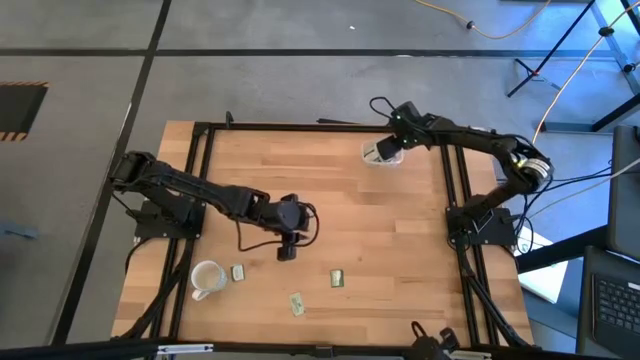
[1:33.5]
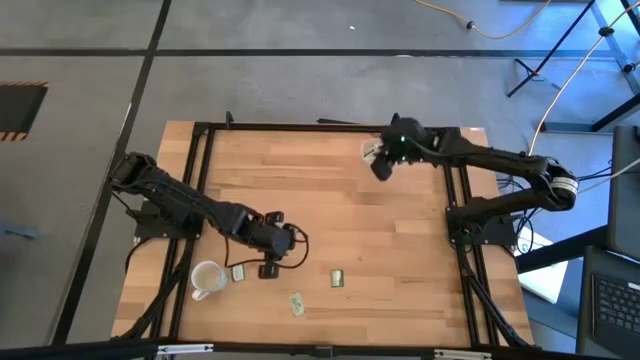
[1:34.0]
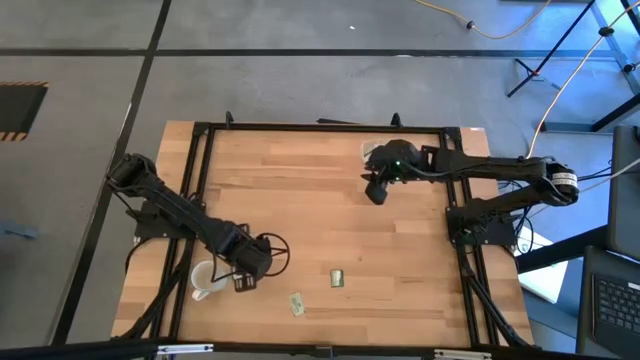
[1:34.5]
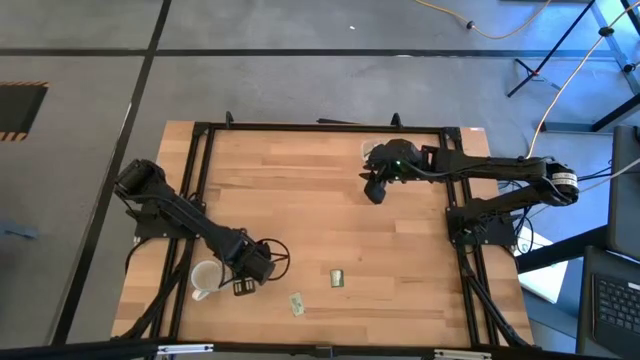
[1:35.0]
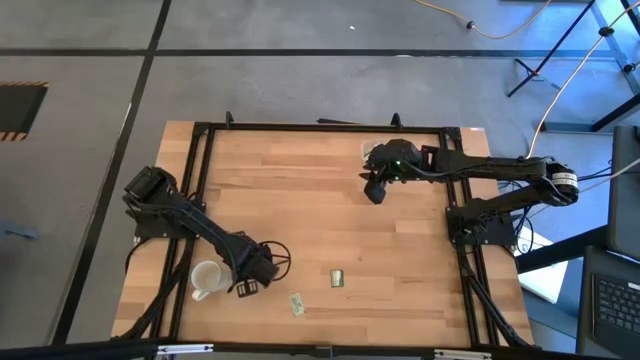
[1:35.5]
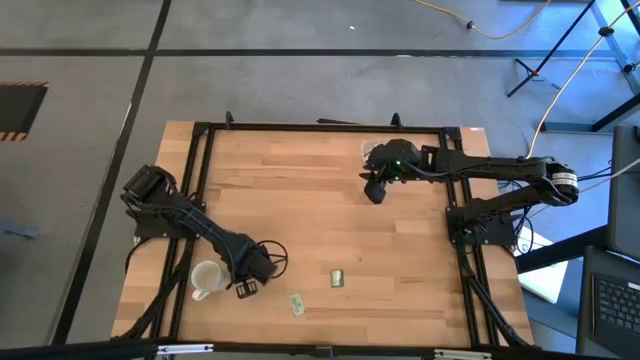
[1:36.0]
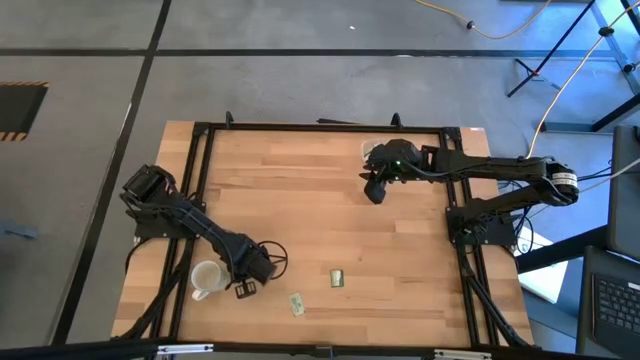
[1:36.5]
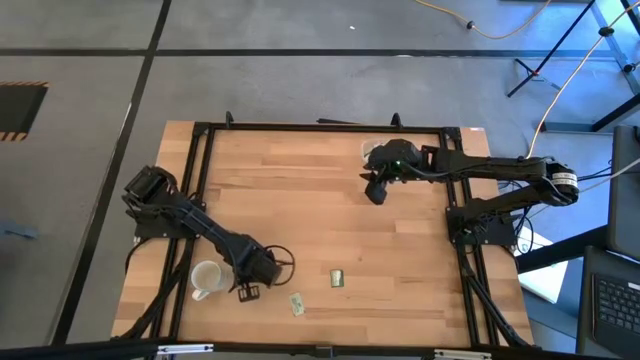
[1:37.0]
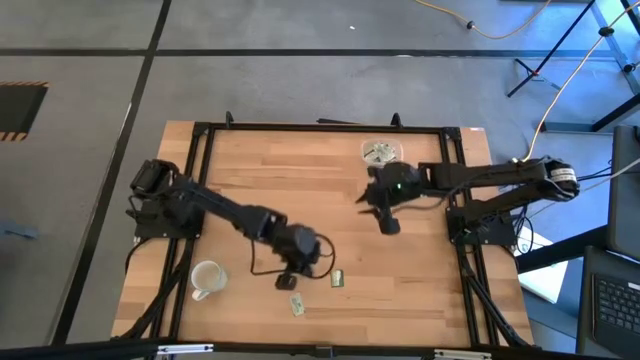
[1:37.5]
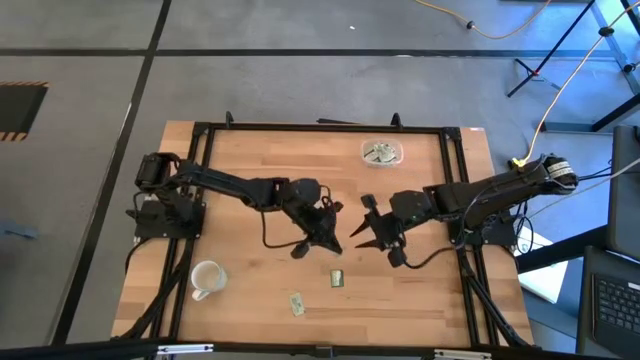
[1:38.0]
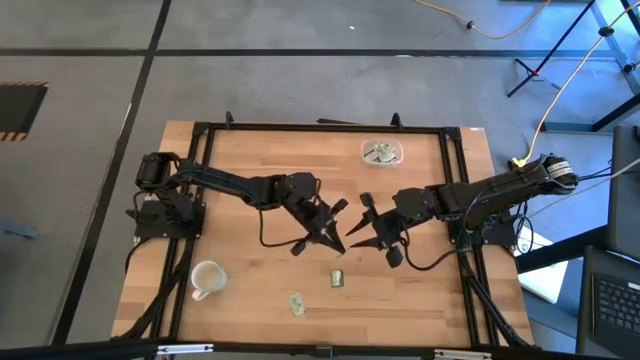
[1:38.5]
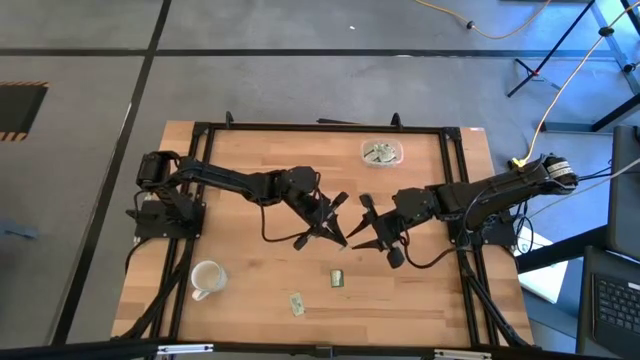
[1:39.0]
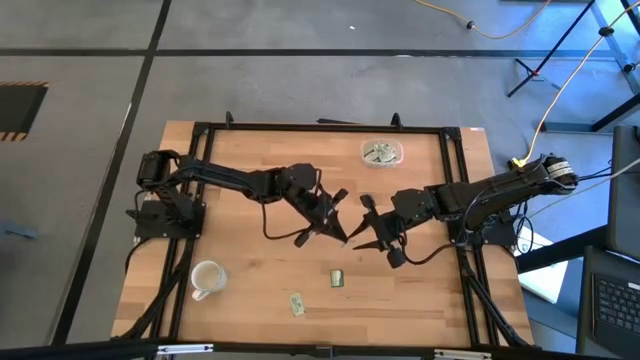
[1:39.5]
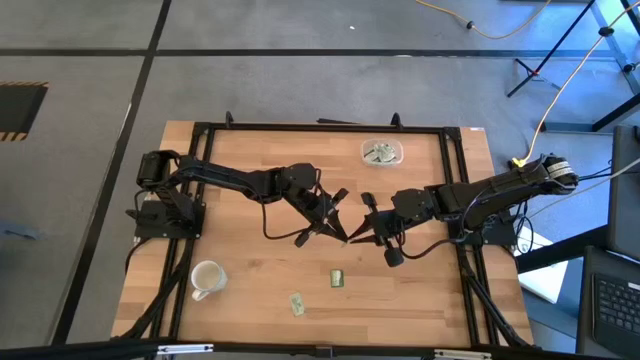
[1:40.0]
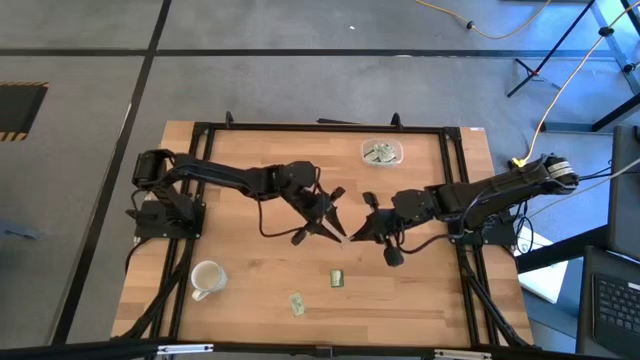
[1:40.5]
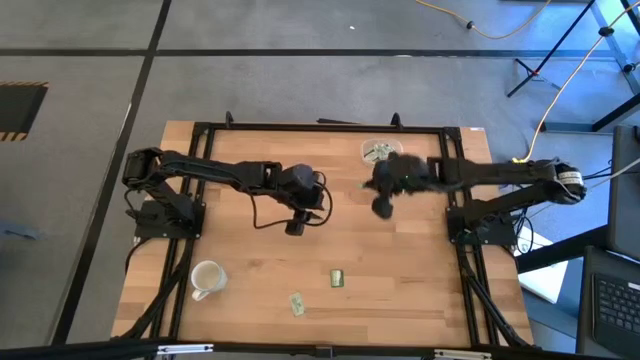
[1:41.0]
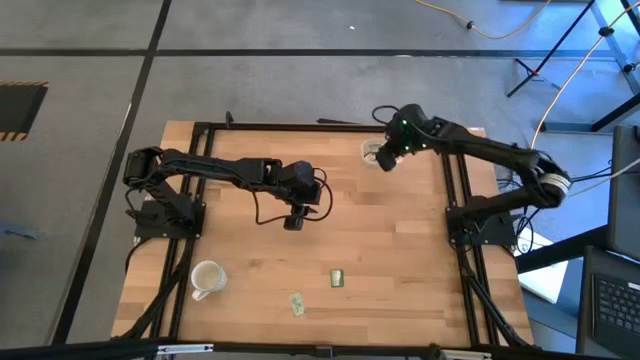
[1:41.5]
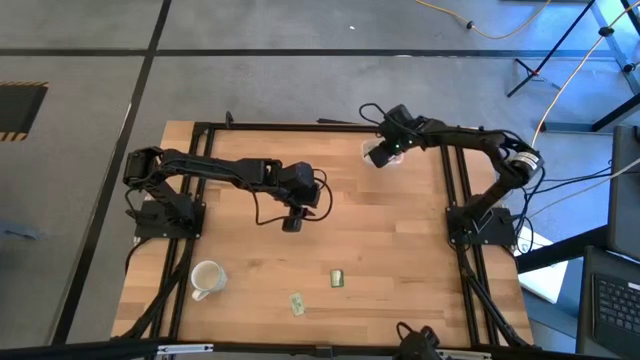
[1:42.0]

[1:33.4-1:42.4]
Task: Pick and place Stevia / Truvia into bins
Put the dark green truvia packet into the transparent container

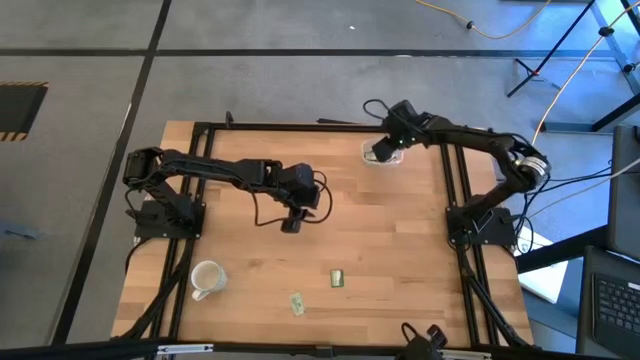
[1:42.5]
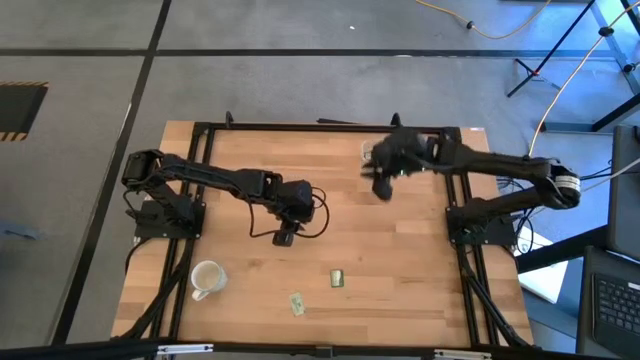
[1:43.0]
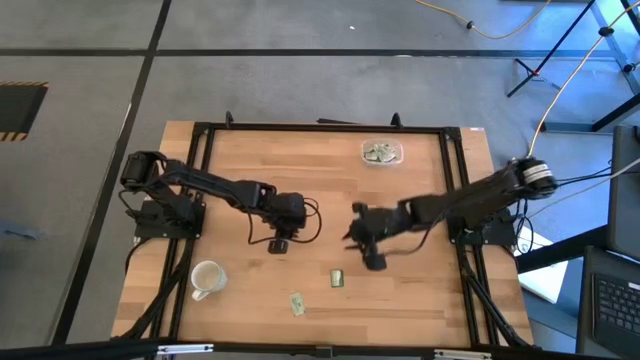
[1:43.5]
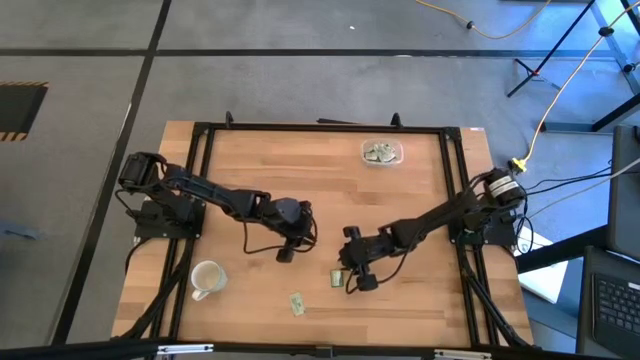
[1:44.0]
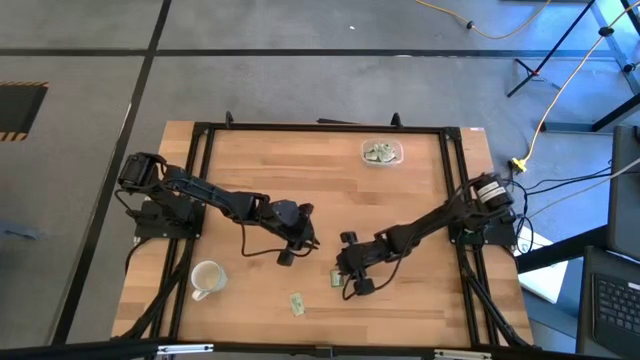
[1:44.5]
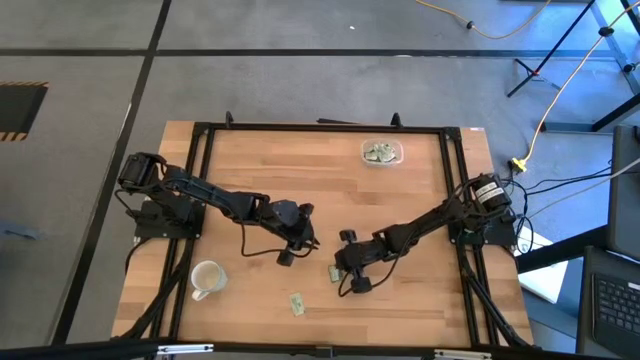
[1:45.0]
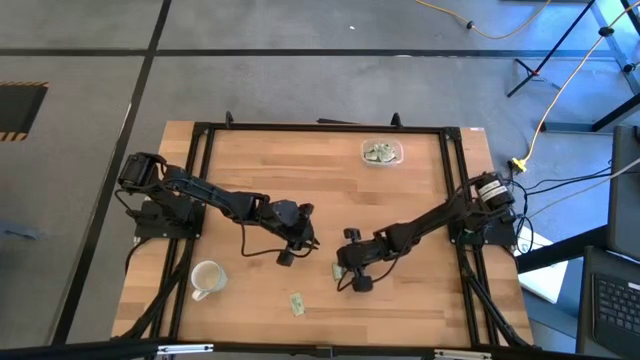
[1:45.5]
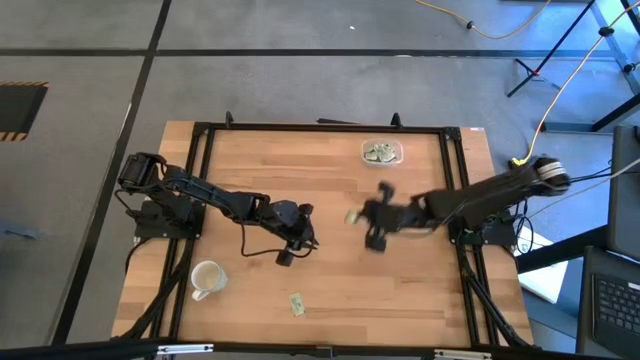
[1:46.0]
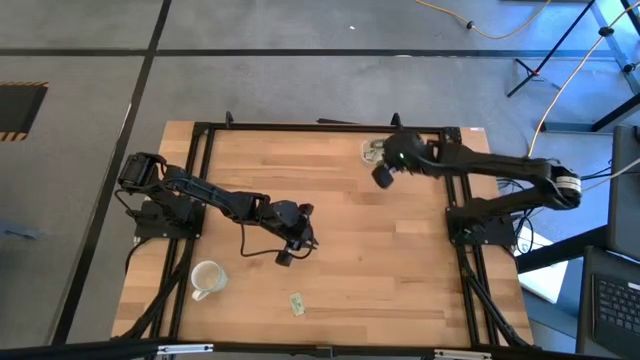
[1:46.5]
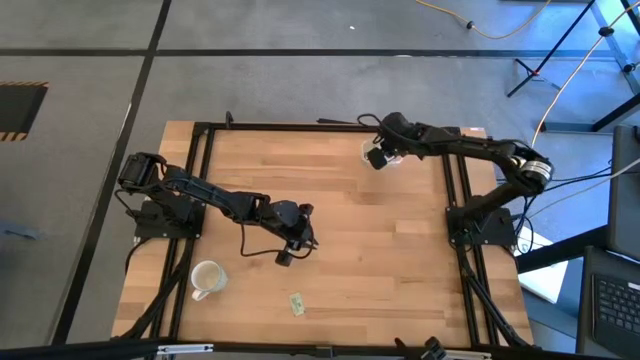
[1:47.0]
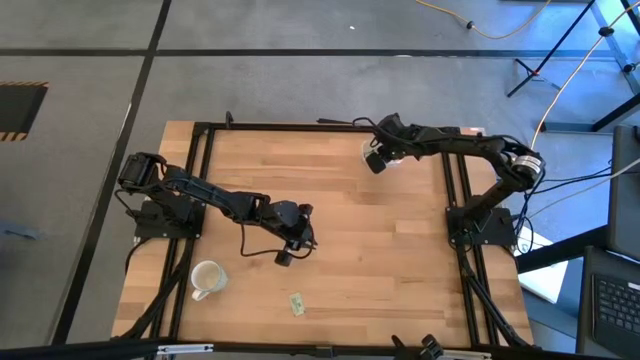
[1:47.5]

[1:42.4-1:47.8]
Put the dark green truvia packet into the transparent container

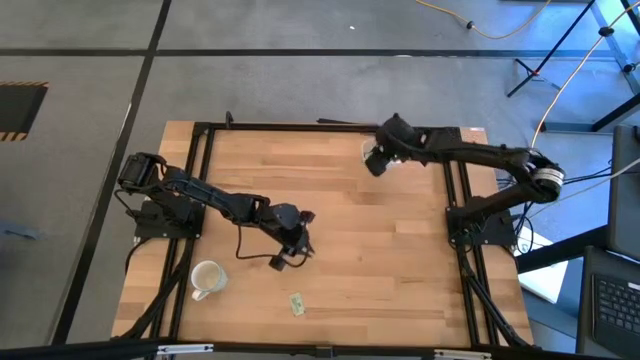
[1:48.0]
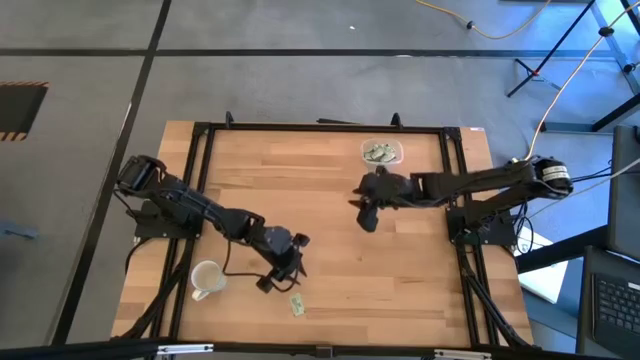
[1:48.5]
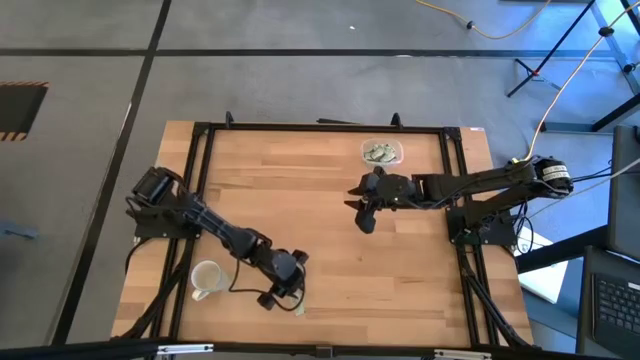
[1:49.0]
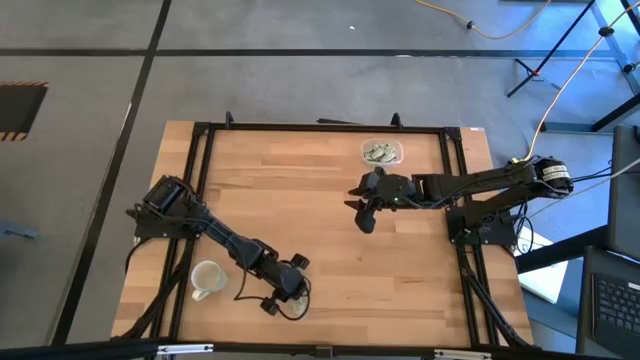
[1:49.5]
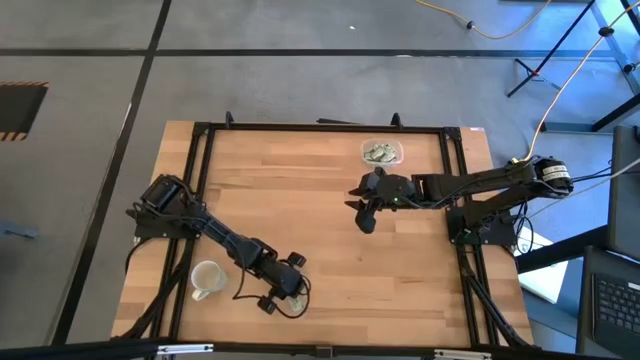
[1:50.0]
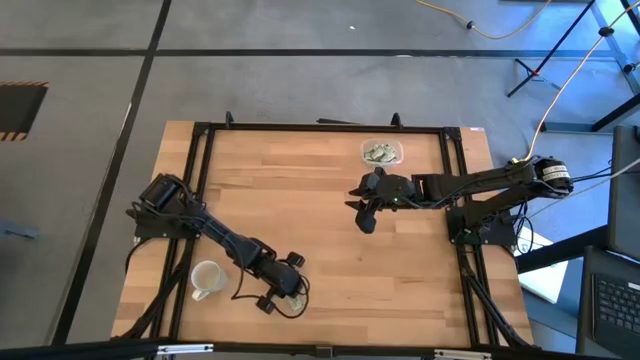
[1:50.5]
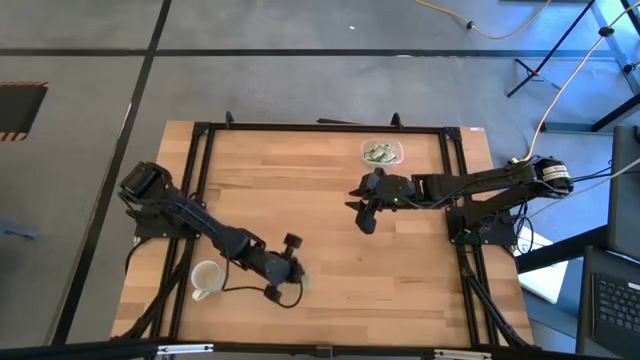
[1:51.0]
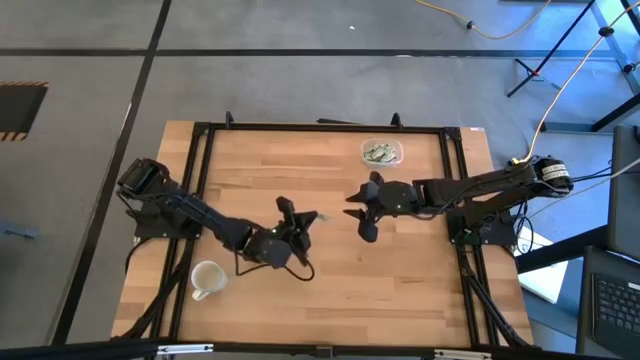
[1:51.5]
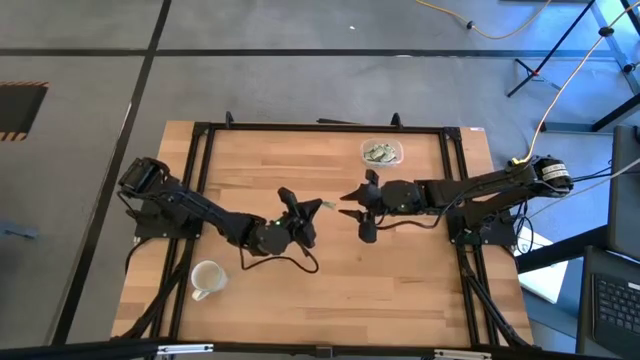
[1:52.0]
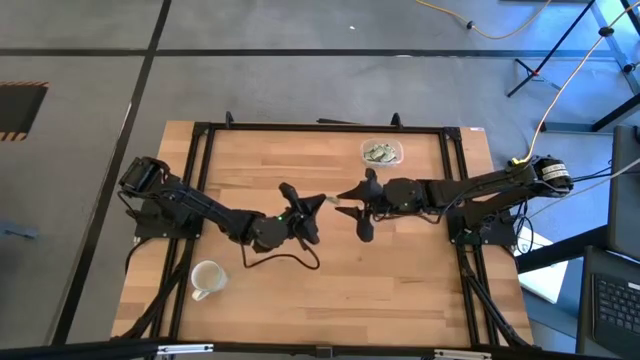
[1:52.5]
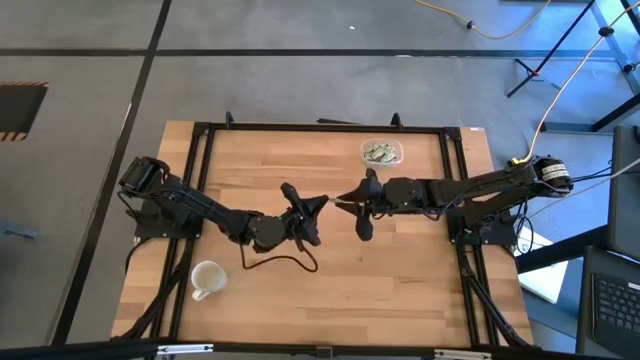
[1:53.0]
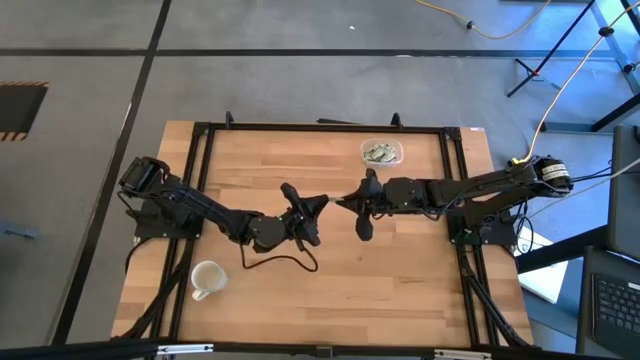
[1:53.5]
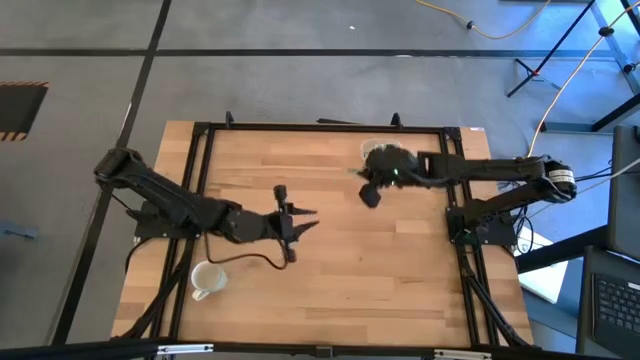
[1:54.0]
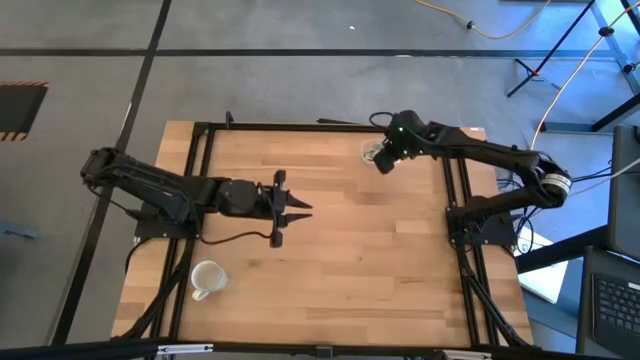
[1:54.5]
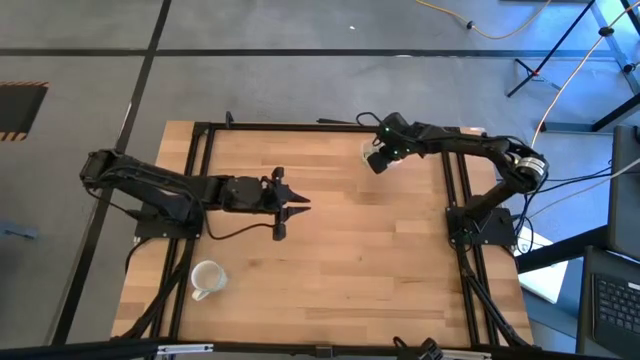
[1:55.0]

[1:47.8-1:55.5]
Put the green stevia packet into the transparent container
